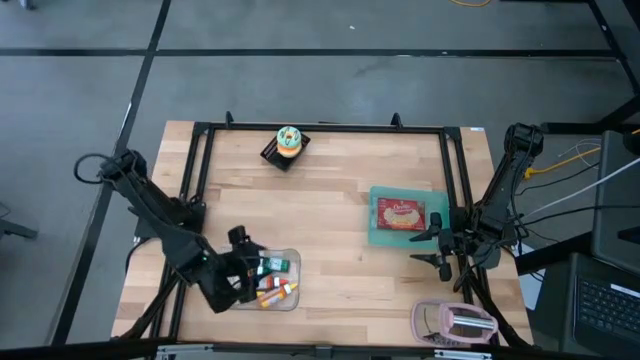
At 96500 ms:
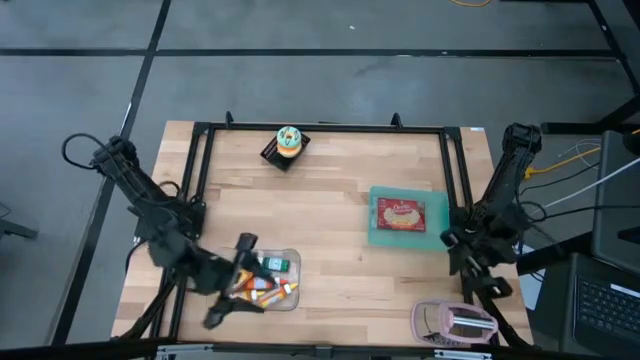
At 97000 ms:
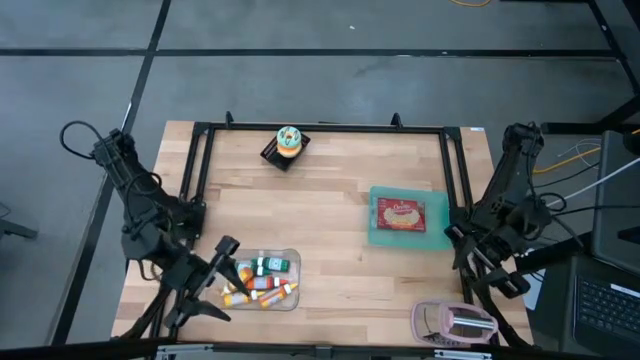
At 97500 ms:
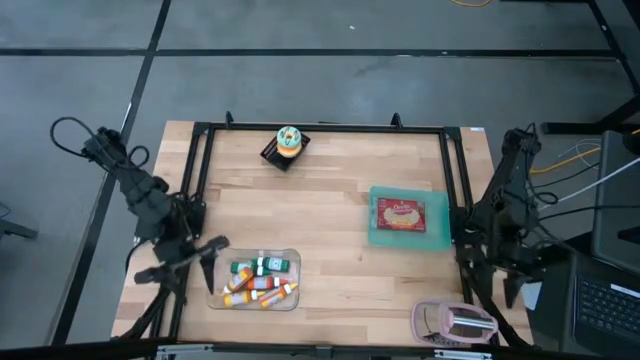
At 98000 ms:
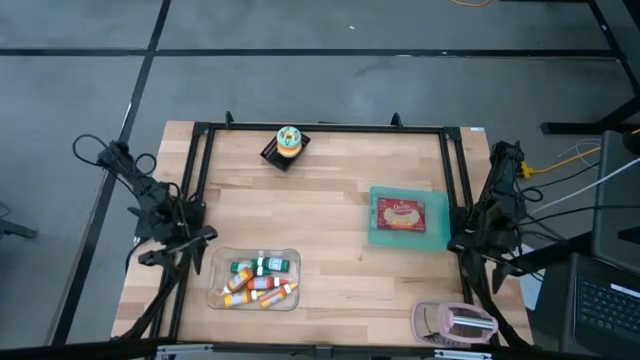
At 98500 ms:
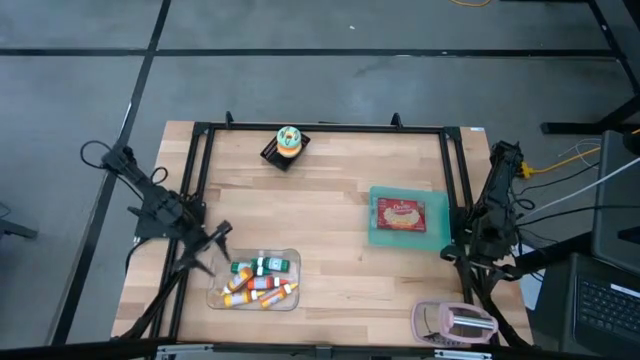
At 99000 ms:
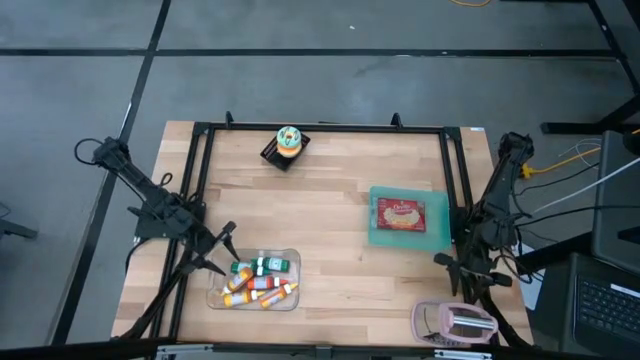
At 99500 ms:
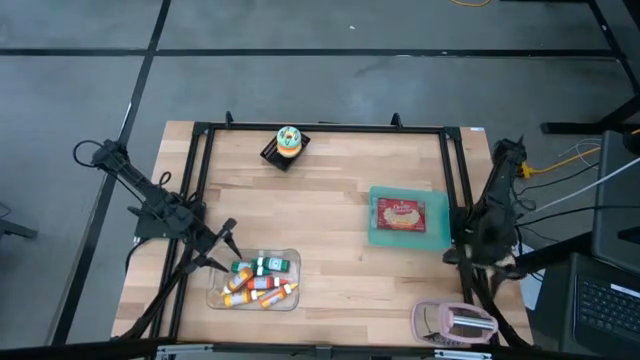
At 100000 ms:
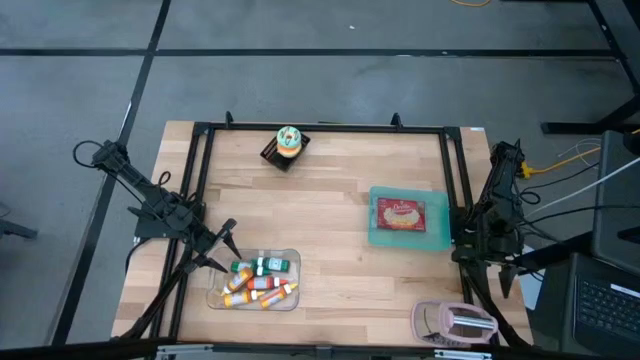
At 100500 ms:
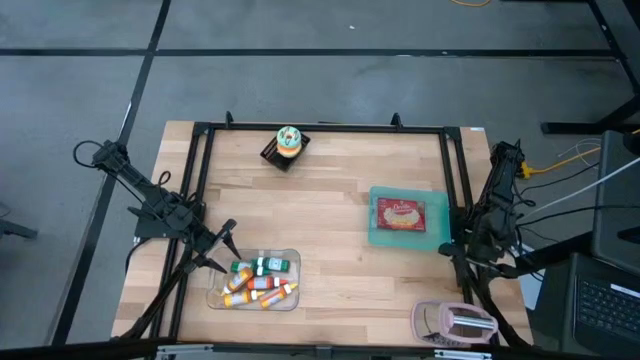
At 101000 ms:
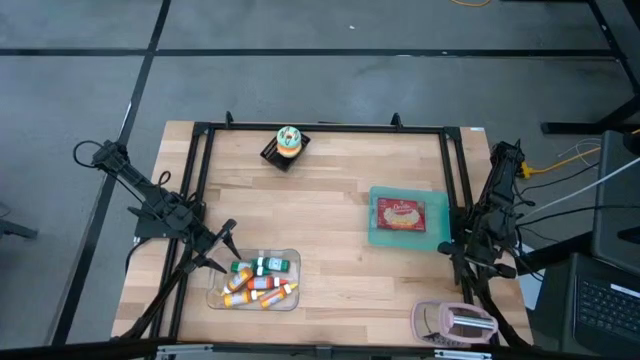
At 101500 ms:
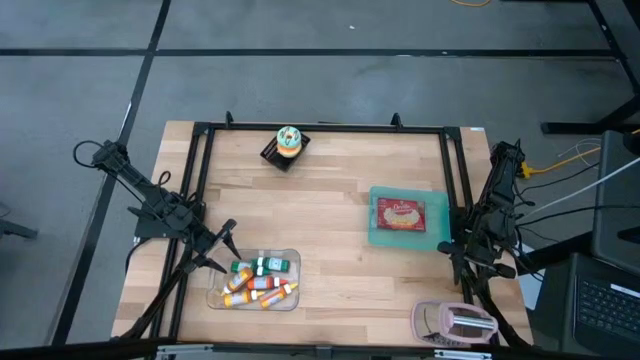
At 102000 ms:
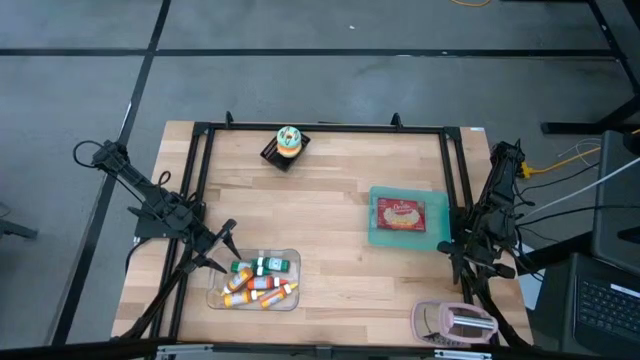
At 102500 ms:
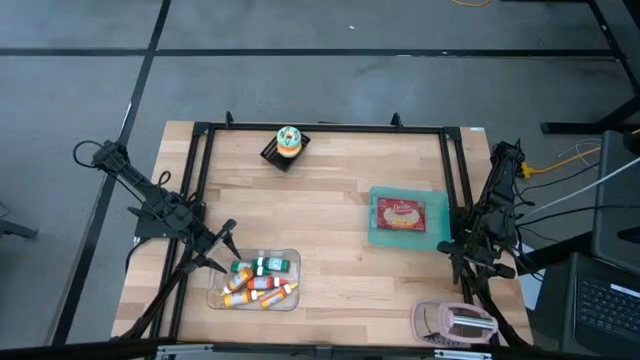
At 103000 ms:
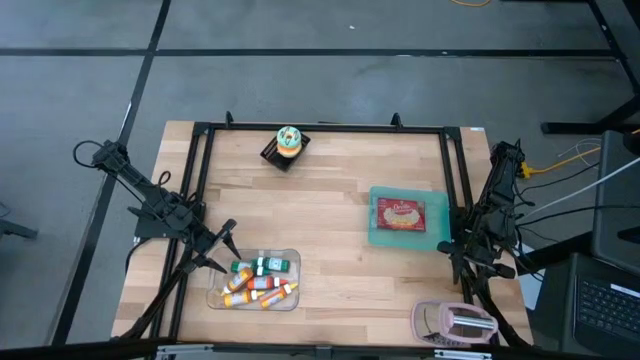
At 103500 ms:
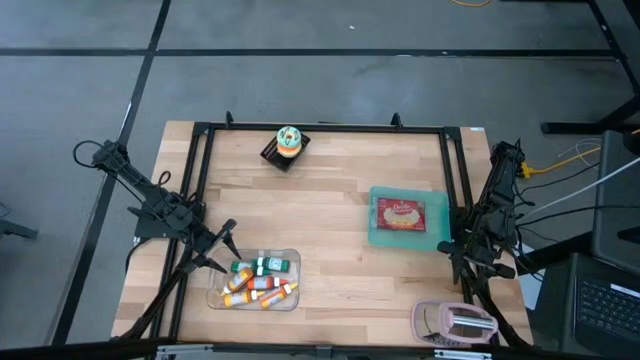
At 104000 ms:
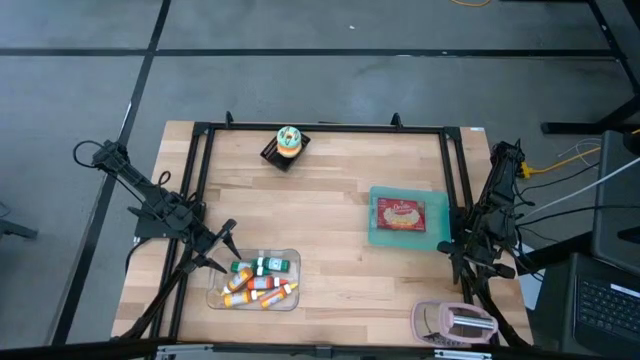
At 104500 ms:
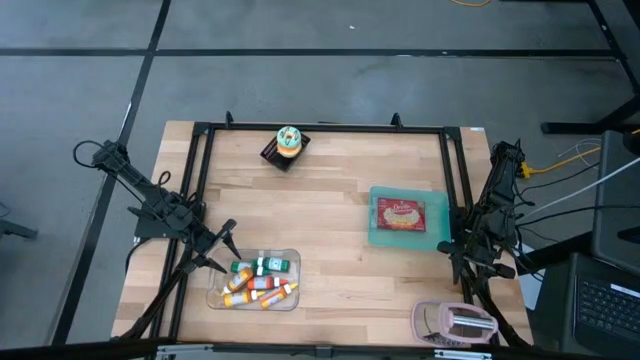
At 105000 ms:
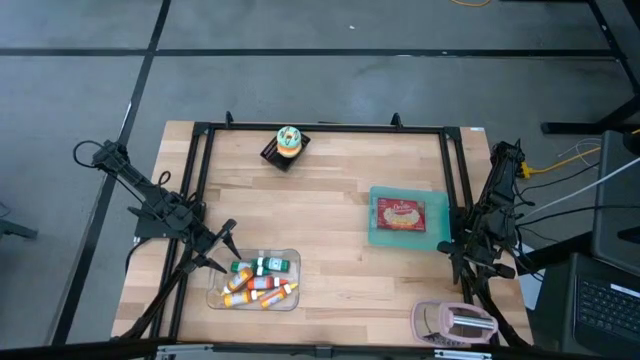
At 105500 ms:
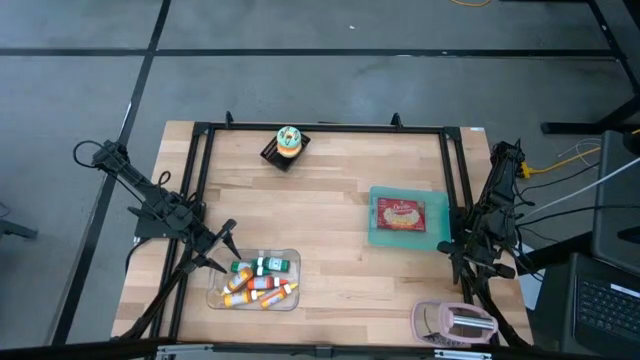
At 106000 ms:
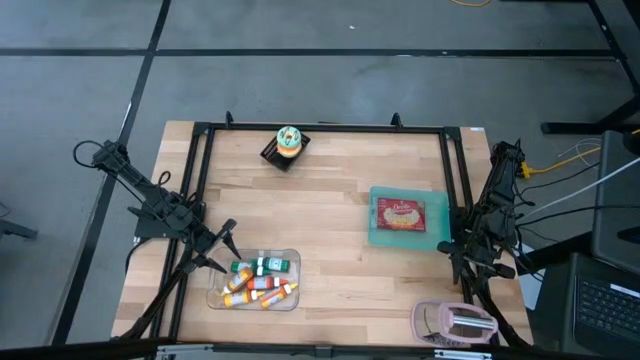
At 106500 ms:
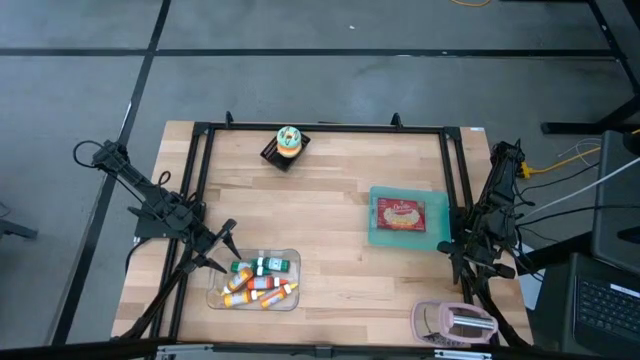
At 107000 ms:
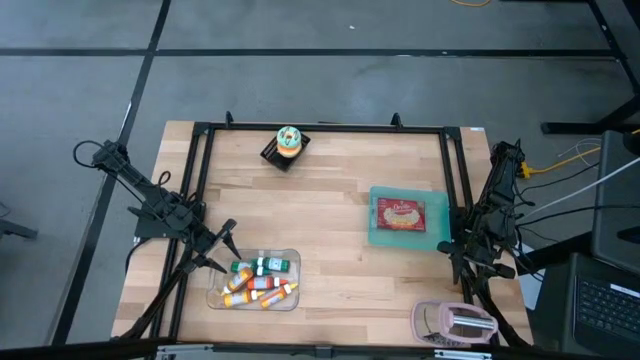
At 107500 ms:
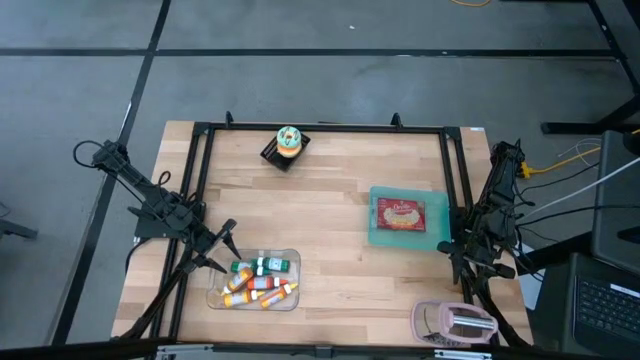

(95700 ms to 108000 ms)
Return to Home Position
